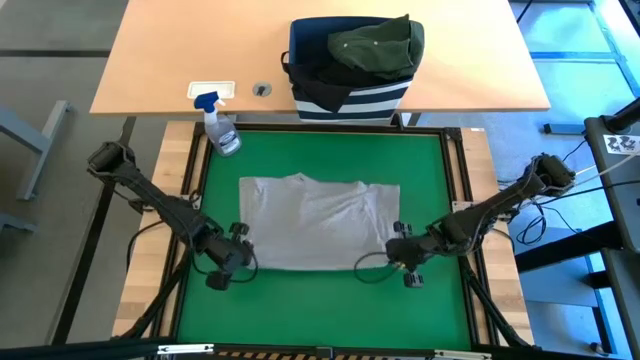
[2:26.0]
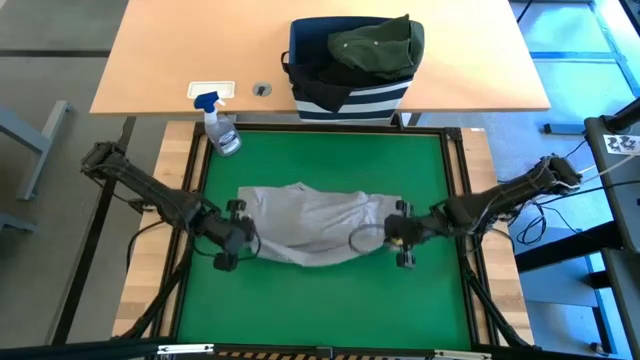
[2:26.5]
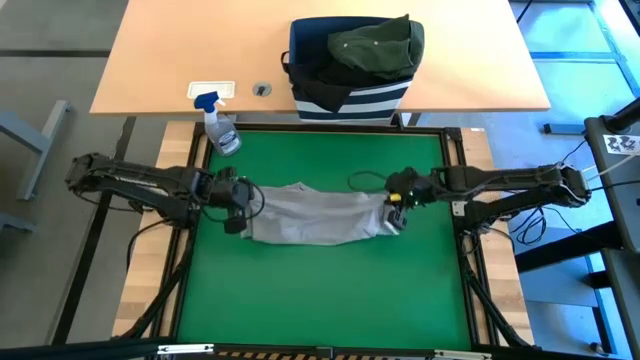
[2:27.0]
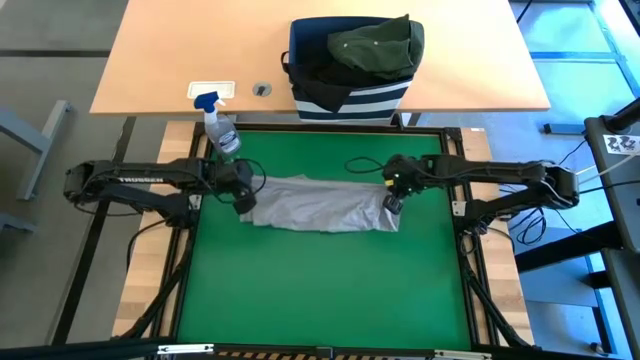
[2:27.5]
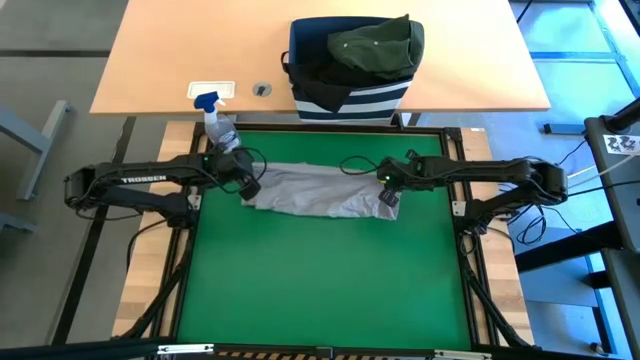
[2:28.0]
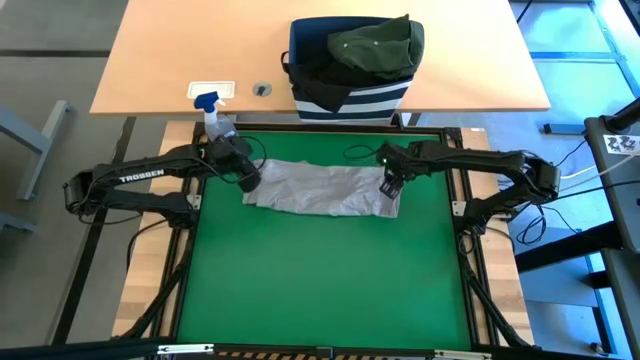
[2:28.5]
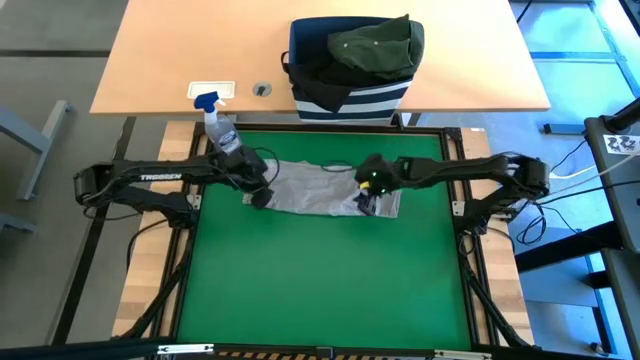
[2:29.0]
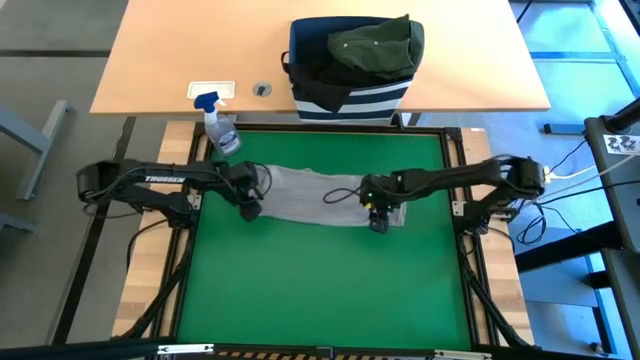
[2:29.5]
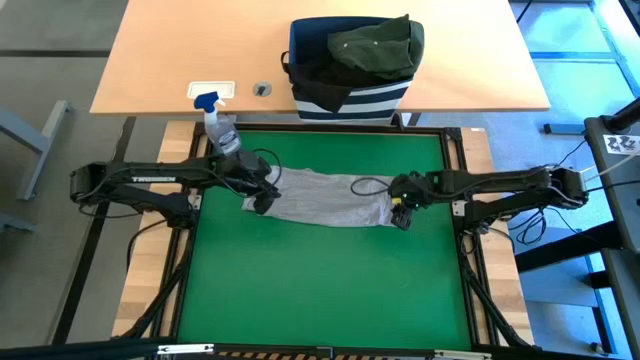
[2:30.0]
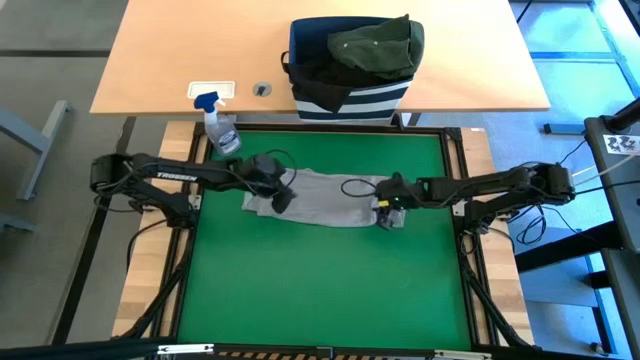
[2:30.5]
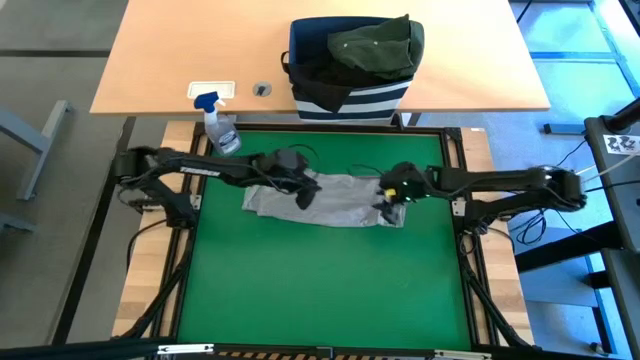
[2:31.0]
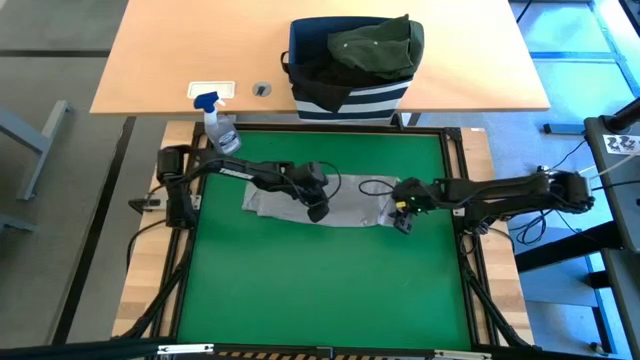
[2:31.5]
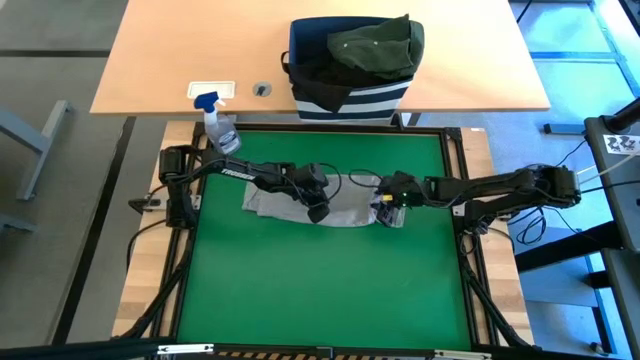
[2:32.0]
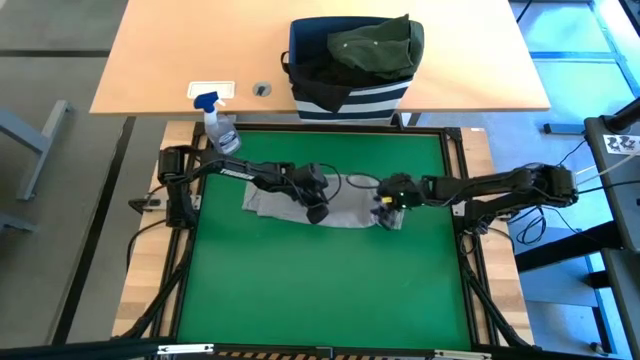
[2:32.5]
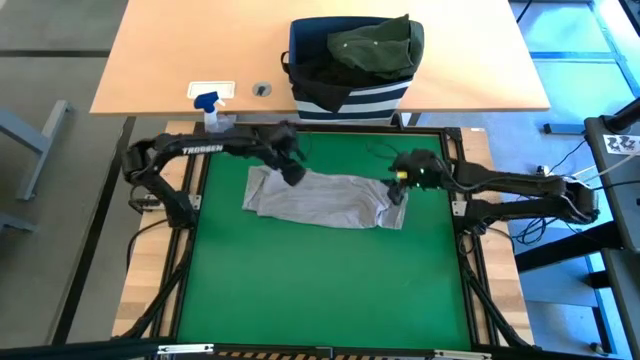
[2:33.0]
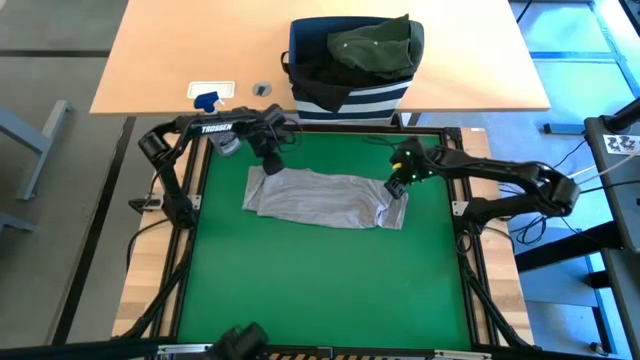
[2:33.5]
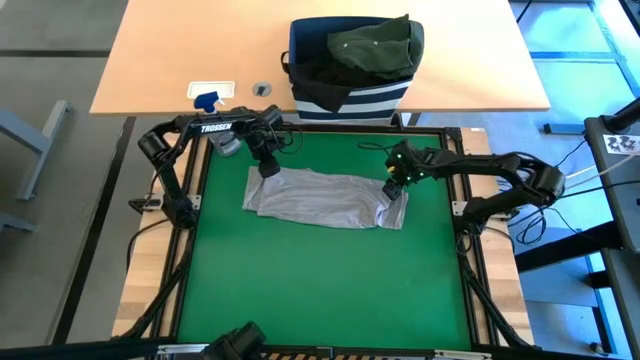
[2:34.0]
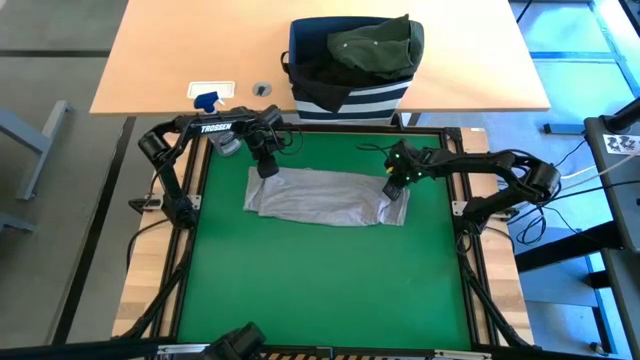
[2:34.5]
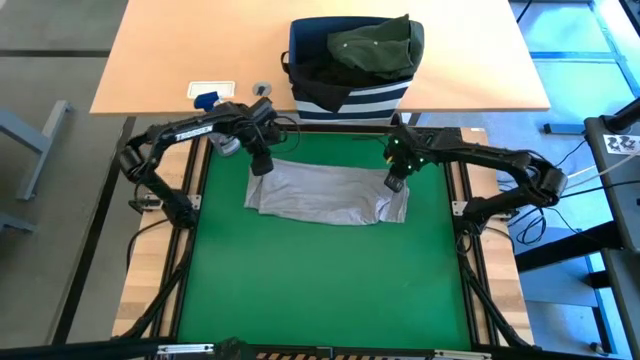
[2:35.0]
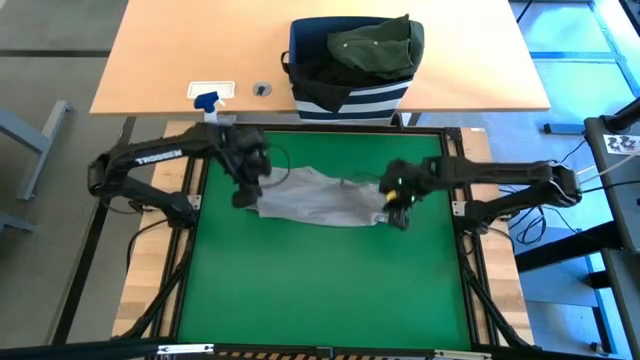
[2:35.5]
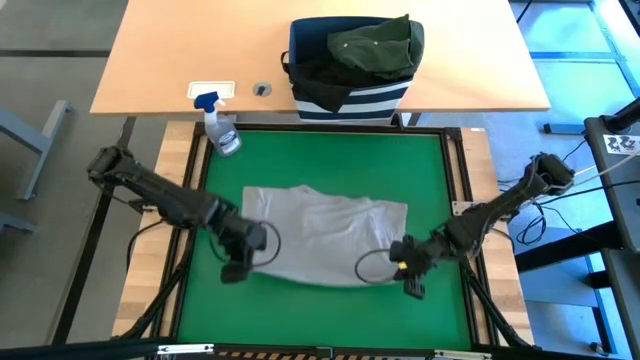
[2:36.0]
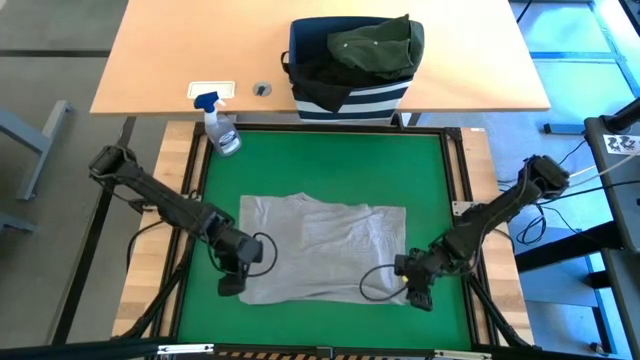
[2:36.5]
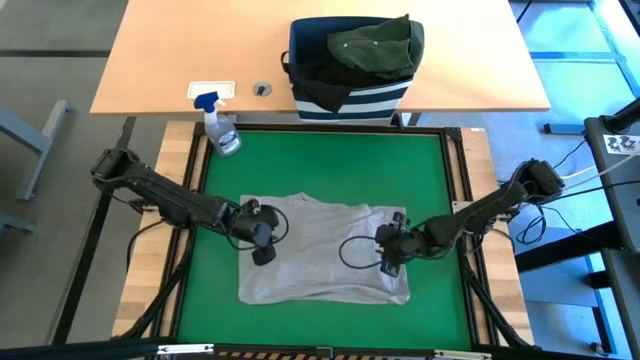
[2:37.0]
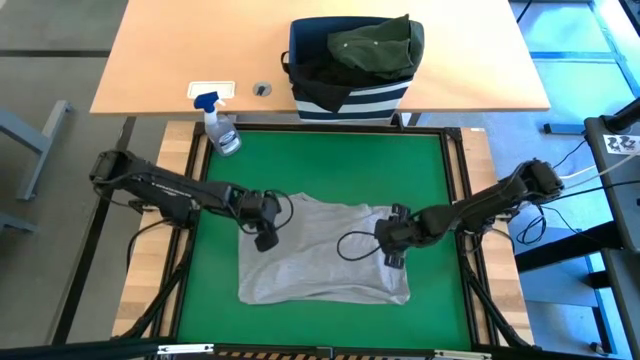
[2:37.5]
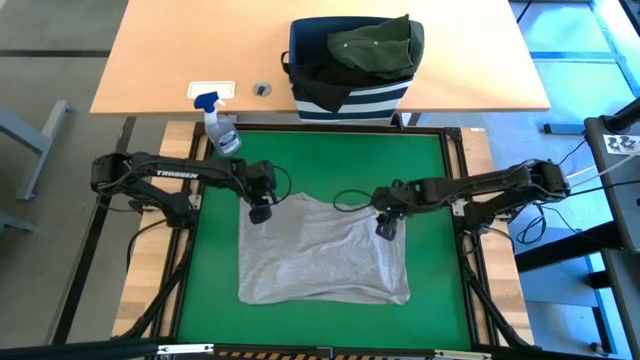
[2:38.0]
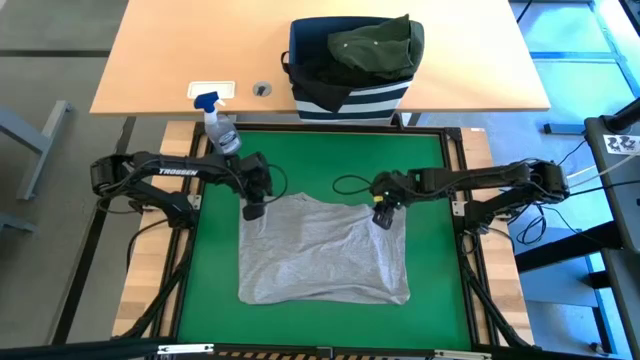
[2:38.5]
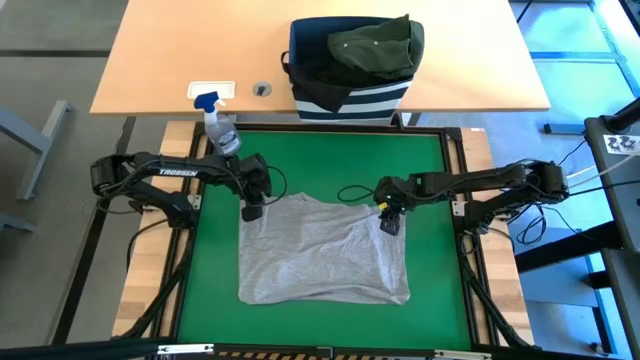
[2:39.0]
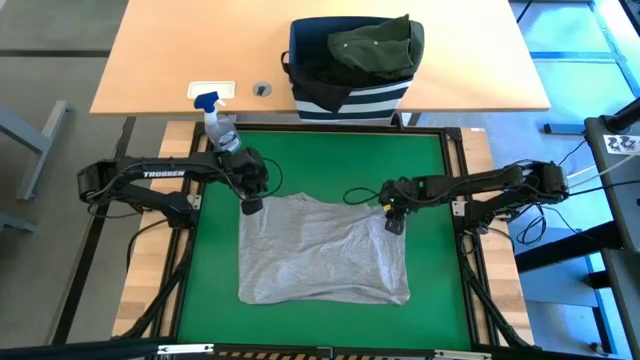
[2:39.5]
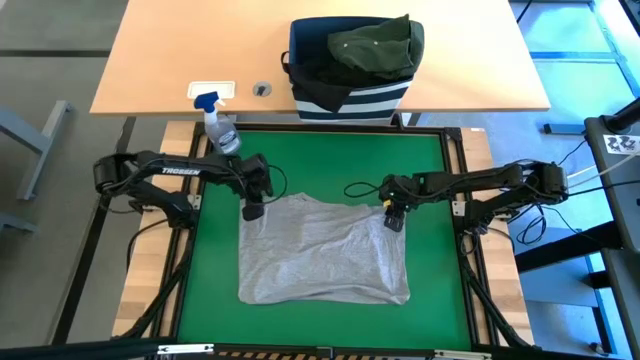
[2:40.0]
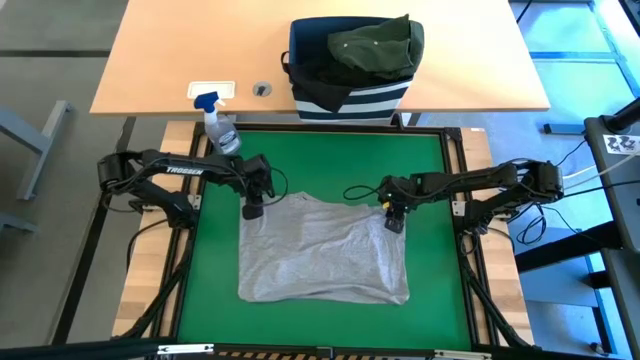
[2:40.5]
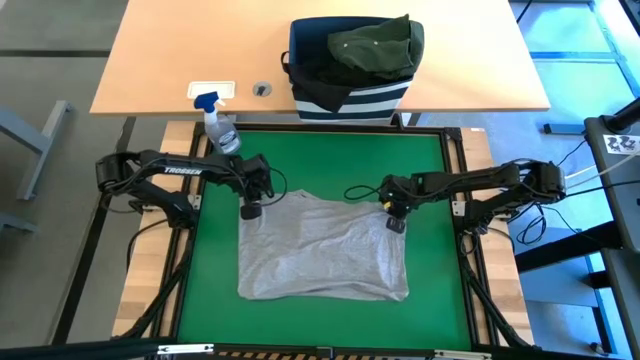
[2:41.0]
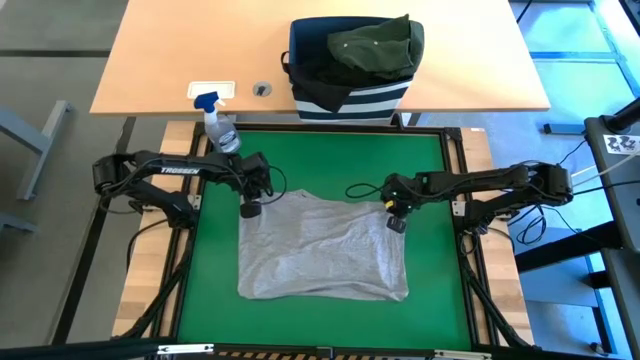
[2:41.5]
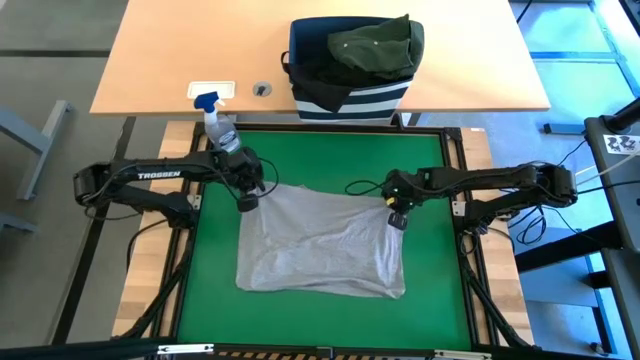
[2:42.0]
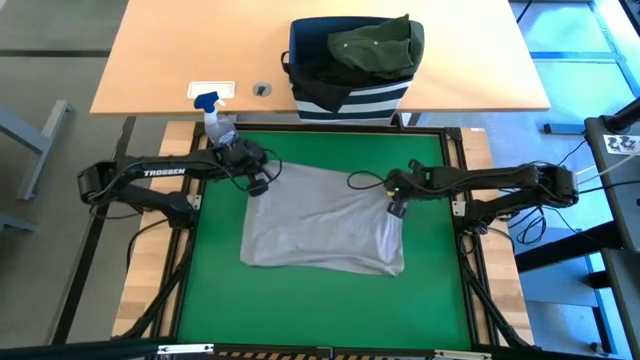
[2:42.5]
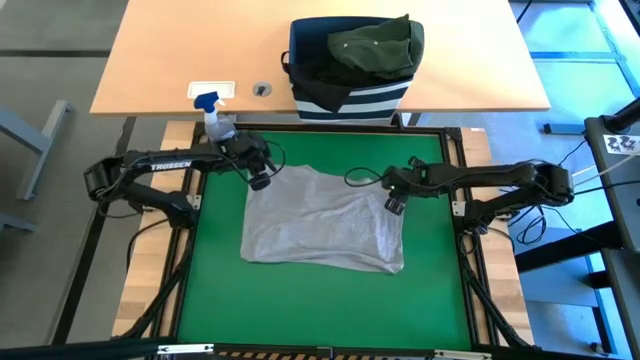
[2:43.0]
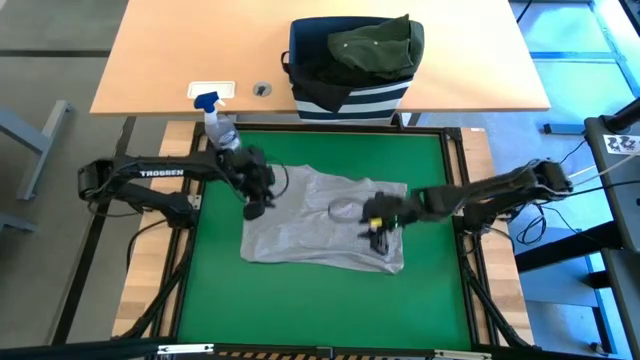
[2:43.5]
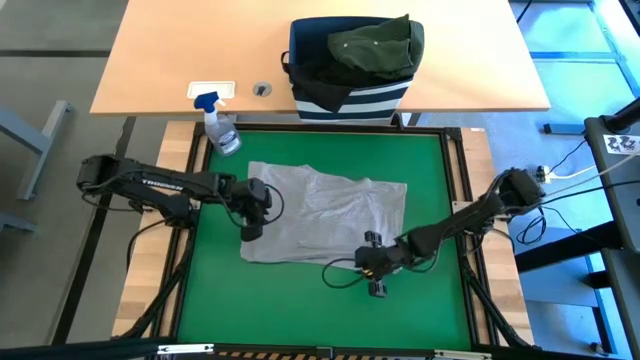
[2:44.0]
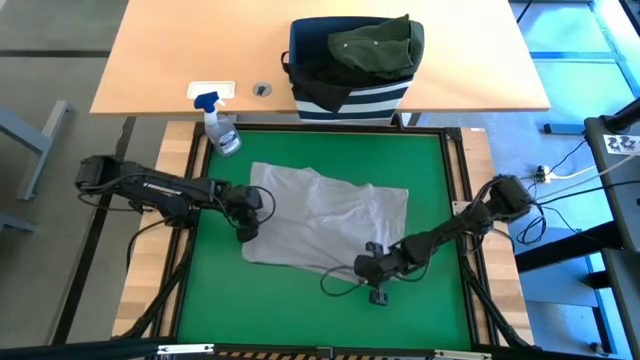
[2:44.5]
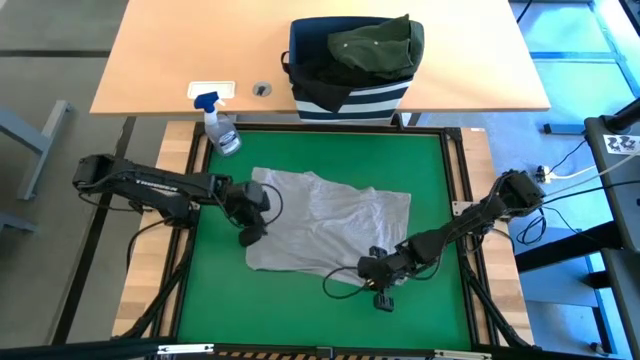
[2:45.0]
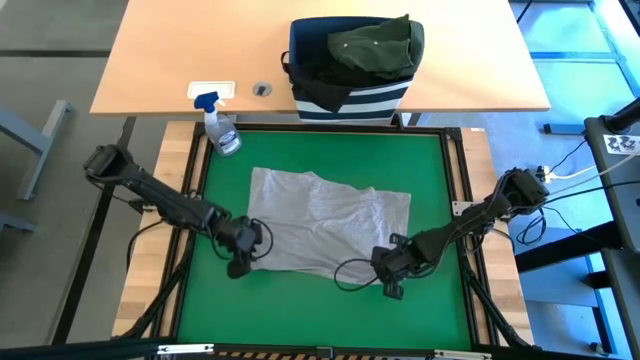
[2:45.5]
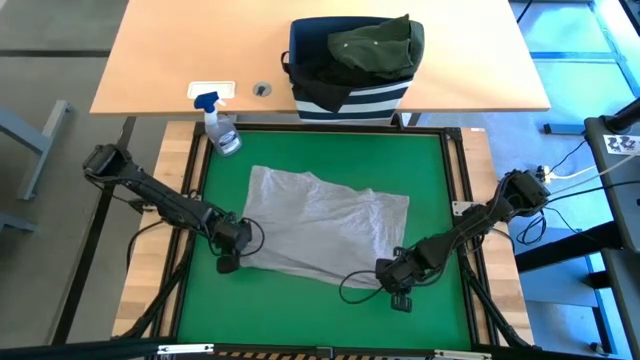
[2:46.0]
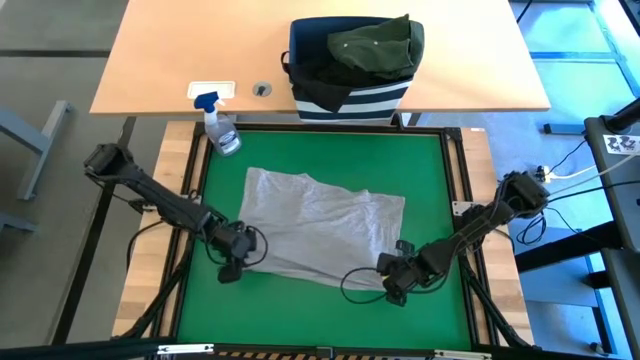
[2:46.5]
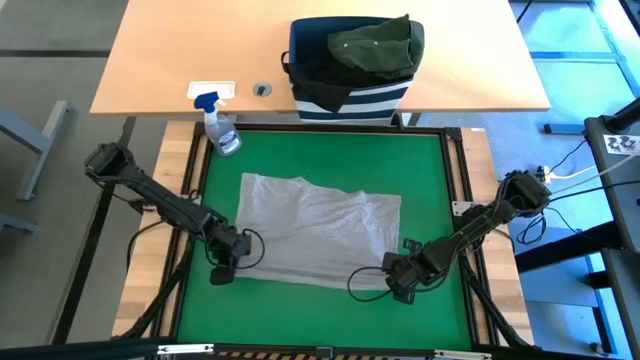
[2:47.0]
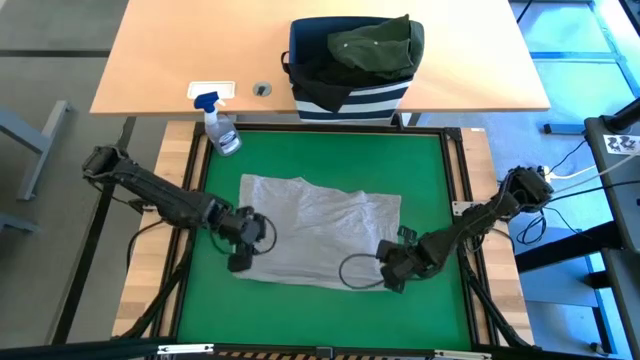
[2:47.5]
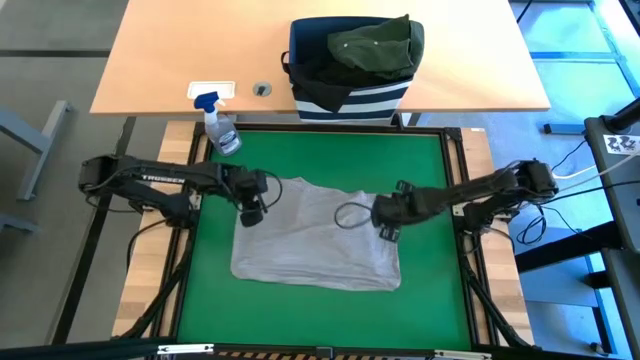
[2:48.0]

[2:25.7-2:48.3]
Task: Fold Laundry from Bin
Fold the gray shirt
